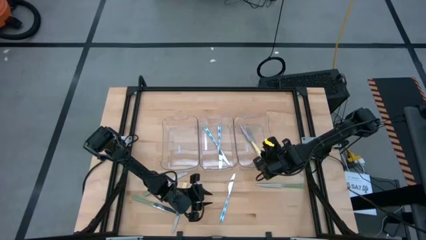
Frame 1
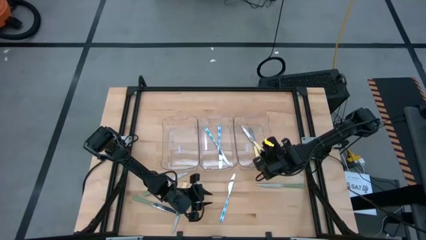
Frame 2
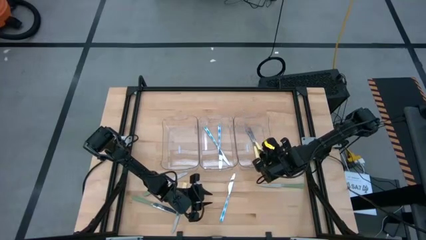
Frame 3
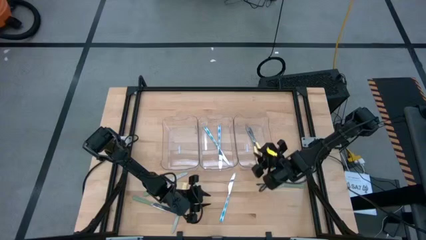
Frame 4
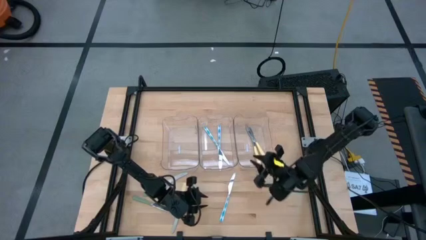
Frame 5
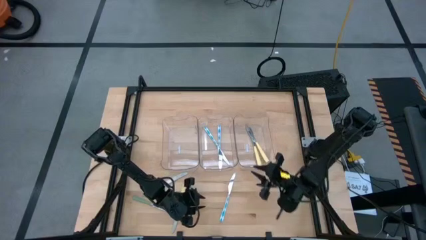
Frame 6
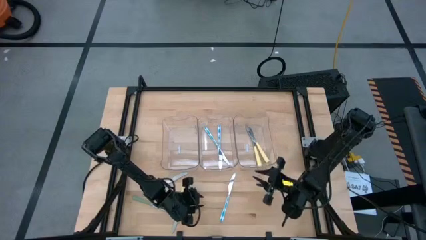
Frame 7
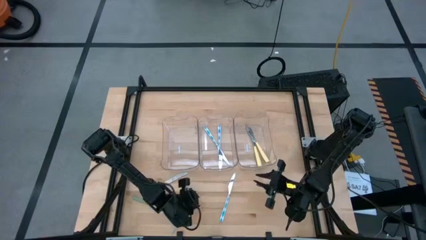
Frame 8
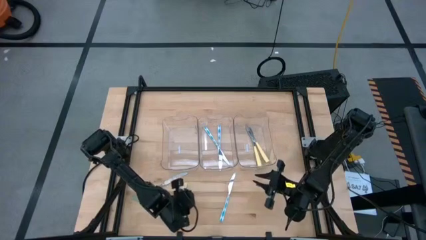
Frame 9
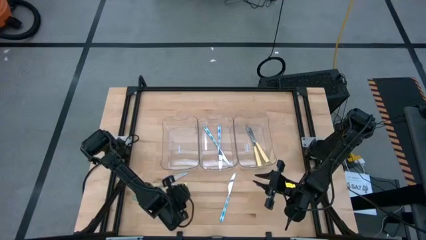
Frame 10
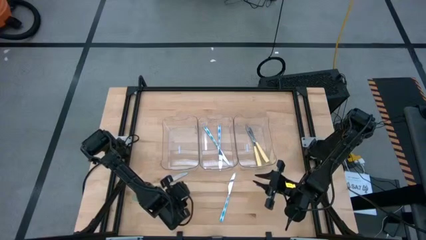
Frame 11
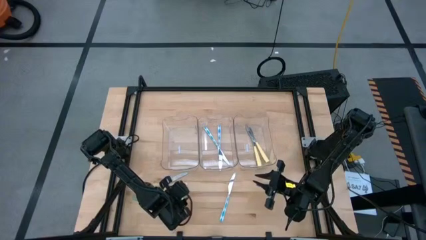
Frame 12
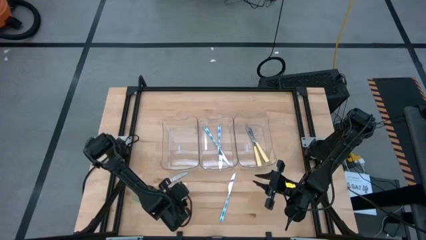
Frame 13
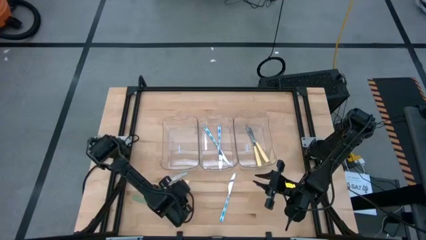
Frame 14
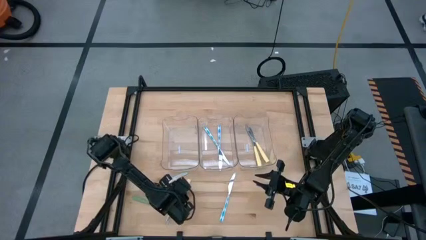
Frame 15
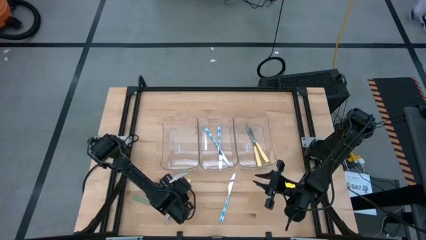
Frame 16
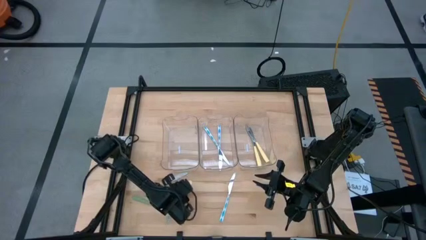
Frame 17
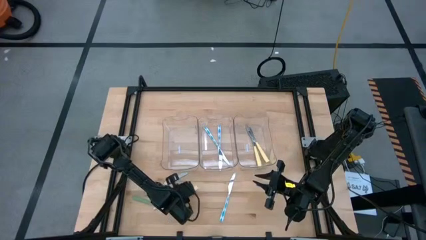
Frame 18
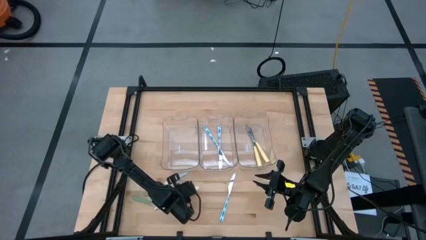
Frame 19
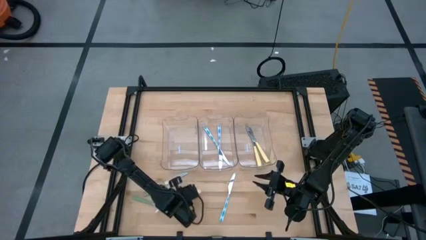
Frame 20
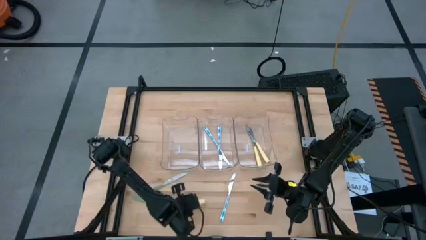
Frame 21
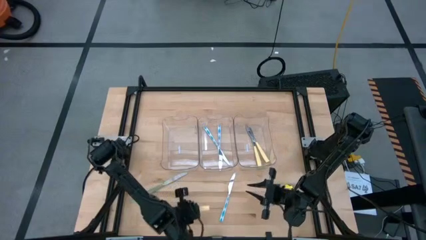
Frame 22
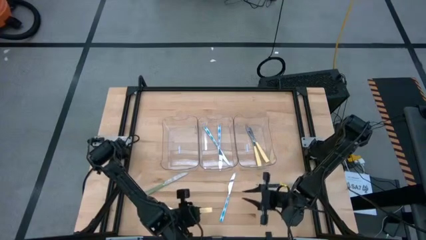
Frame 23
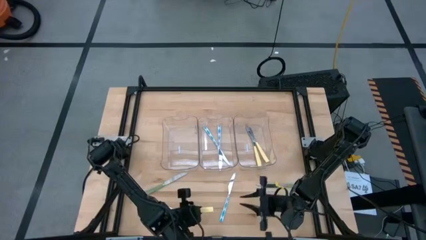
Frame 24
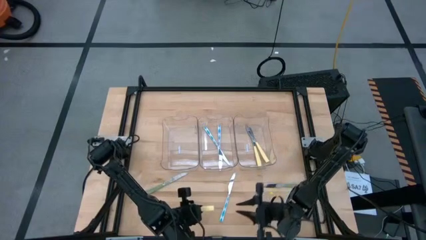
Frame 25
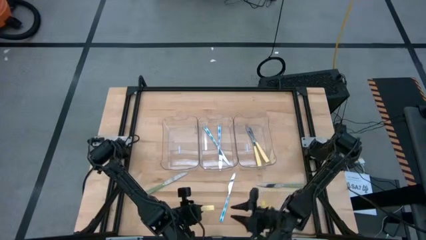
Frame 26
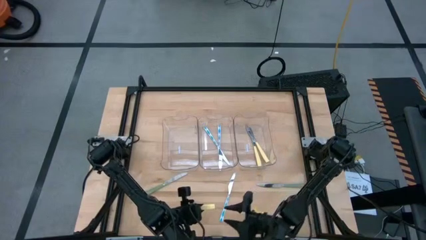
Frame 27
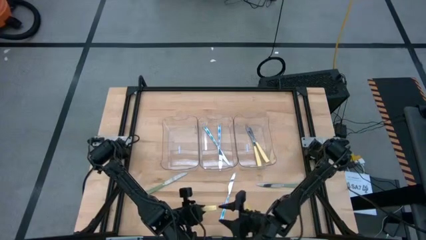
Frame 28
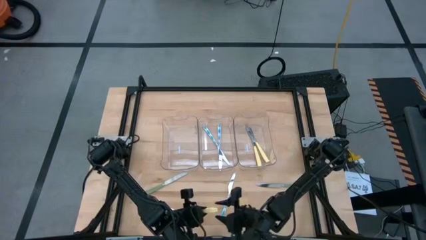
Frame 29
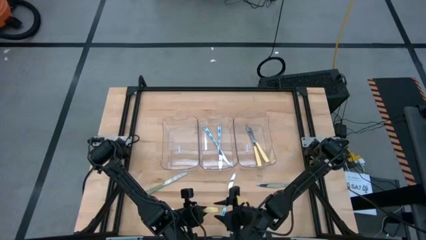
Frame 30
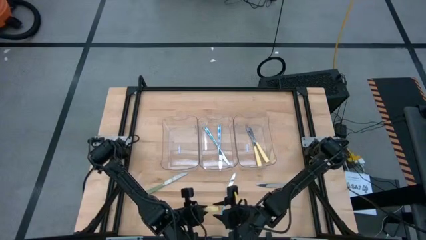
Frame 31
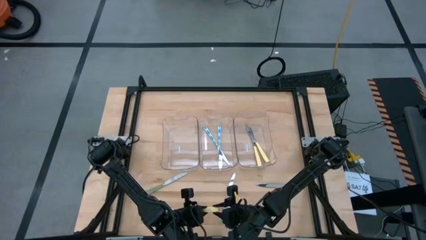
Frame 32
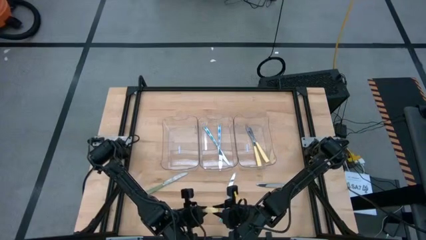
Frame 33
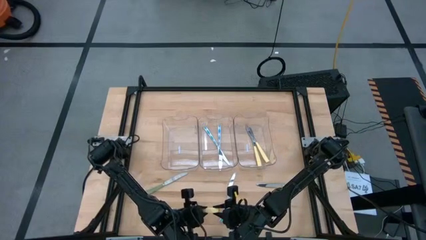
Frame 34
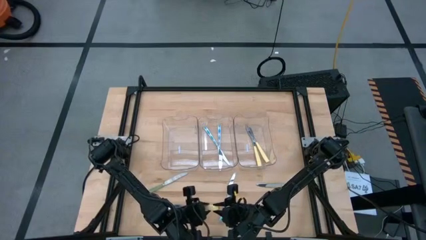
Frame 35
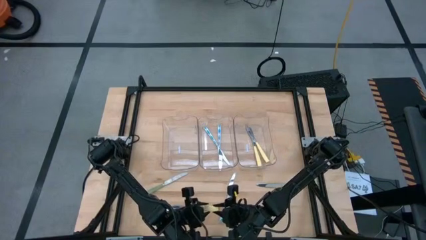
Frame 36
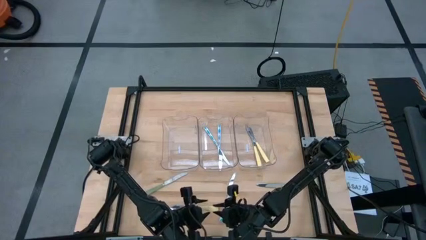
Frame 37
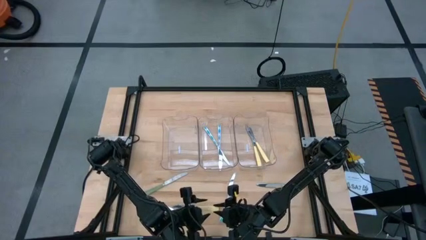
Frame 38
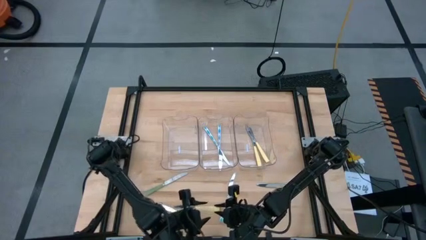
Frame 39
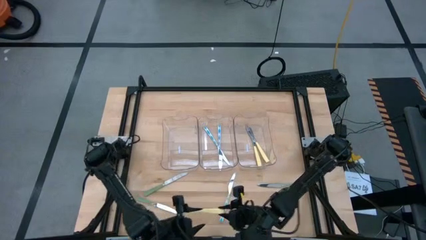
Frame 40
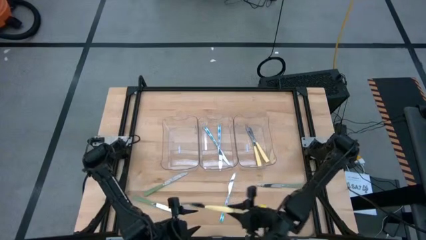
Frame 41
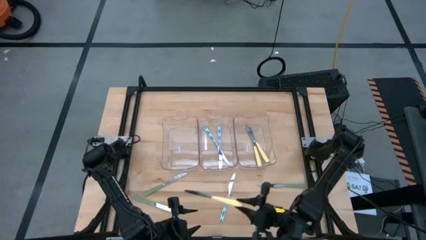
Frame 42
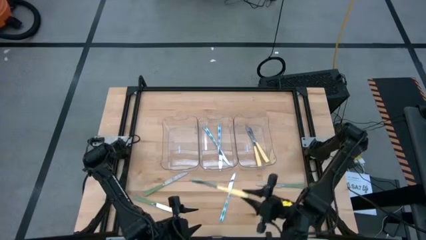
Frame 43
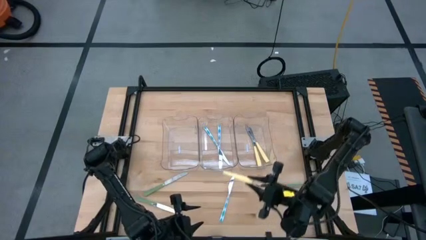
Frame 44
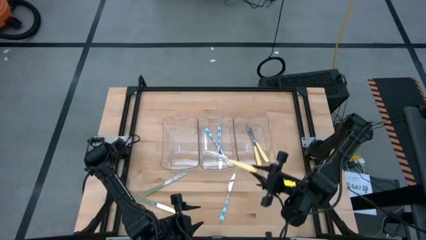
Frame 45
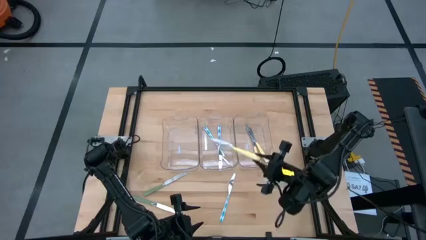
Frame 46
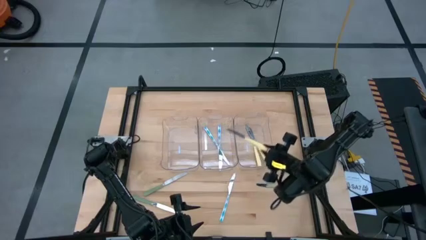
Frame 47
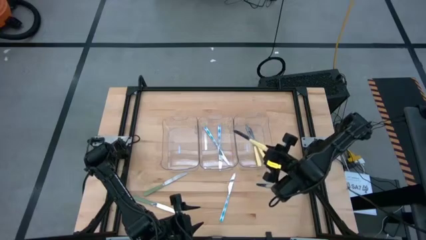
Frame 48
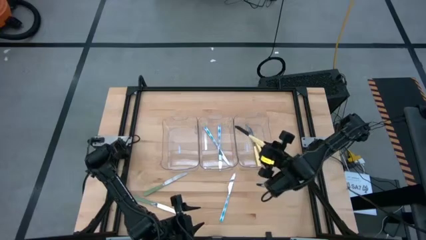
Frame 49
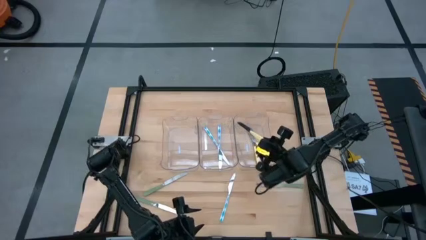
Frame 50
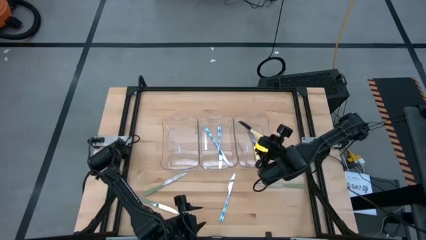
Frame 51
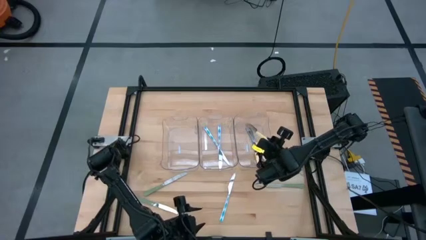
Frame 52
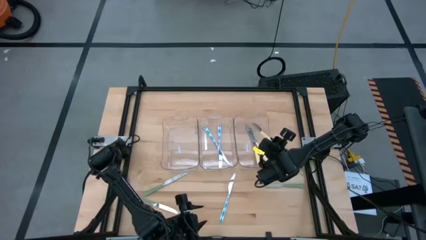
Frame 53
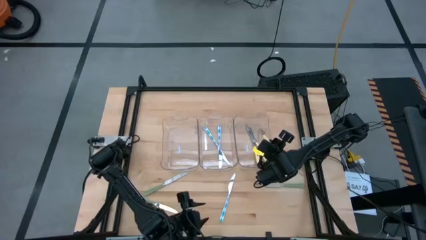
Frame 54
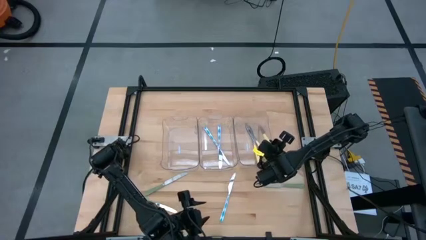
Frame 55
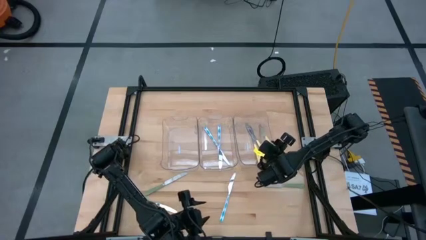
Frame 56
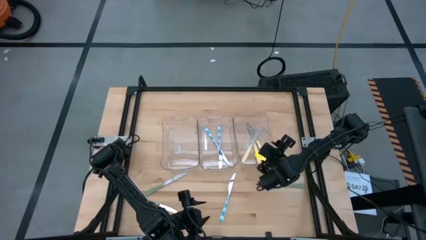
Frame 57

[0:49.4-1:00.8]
Task: Sort silverware by color (type)
Put the yellow knife into the right transparent bin

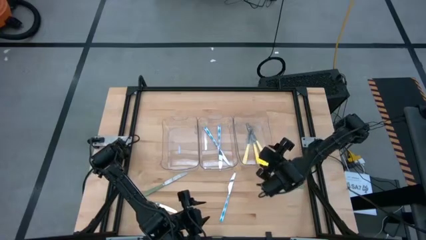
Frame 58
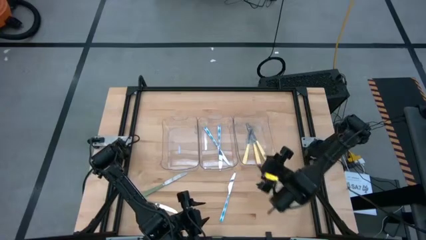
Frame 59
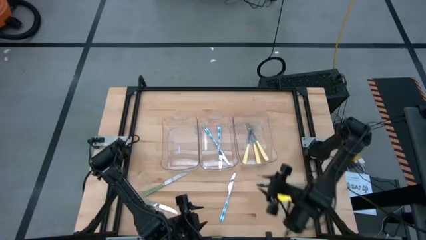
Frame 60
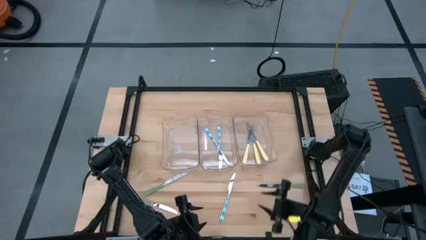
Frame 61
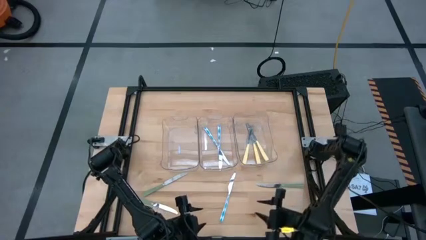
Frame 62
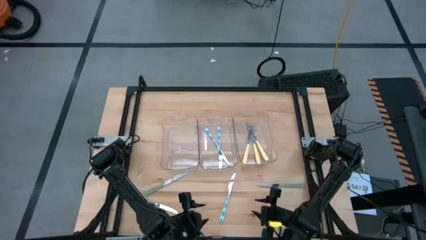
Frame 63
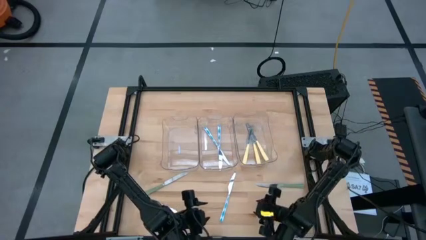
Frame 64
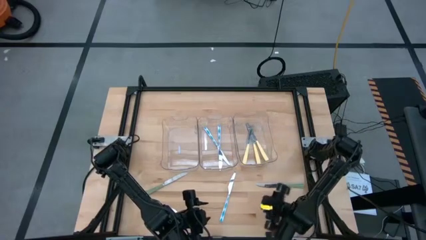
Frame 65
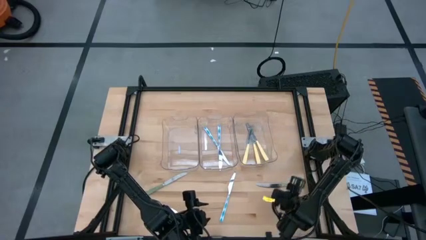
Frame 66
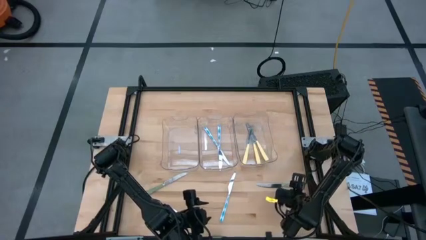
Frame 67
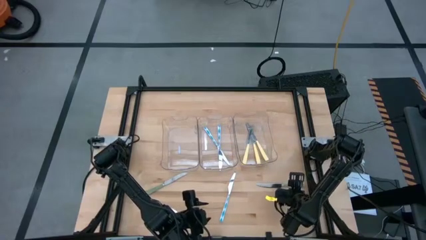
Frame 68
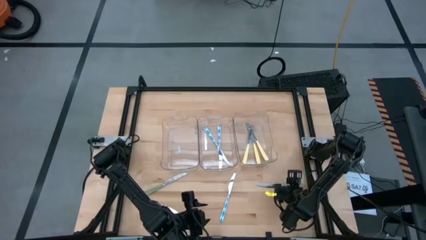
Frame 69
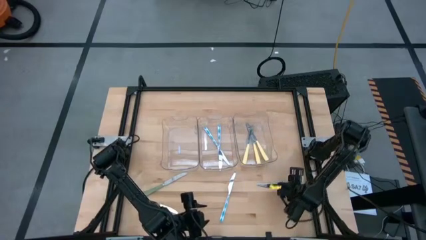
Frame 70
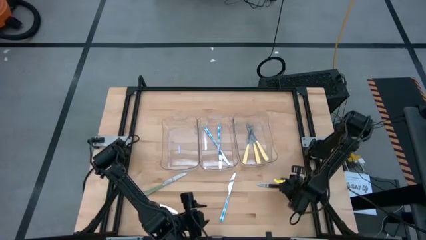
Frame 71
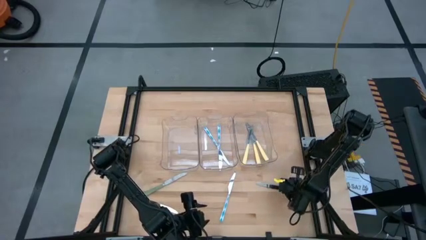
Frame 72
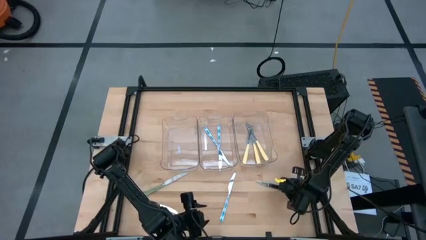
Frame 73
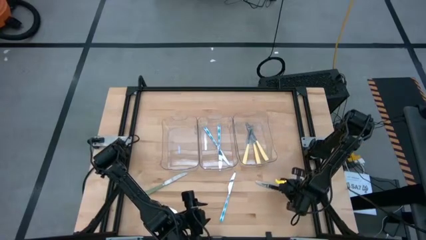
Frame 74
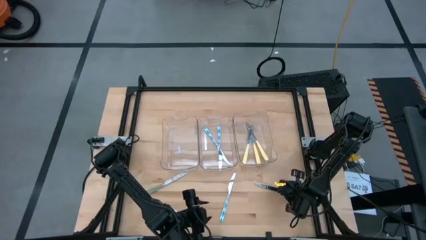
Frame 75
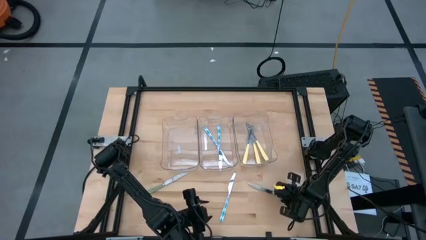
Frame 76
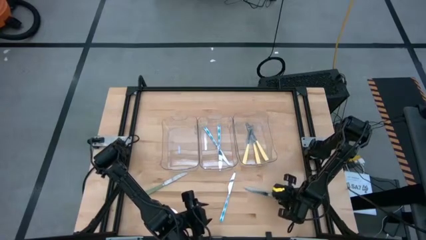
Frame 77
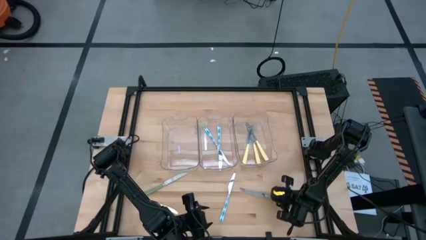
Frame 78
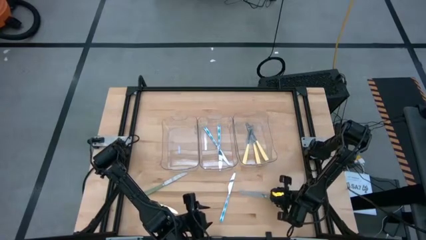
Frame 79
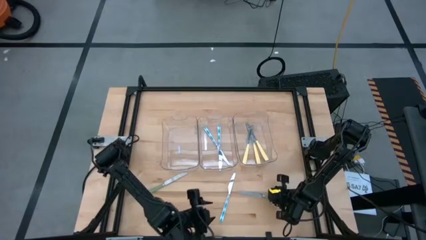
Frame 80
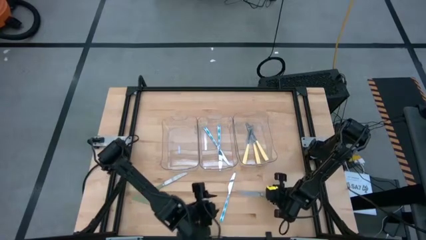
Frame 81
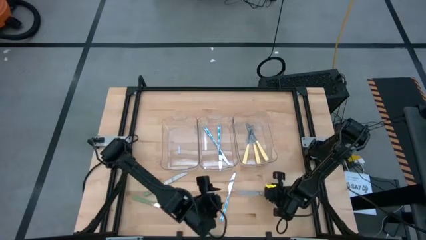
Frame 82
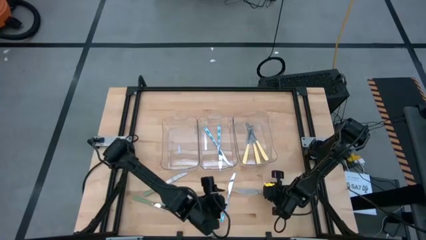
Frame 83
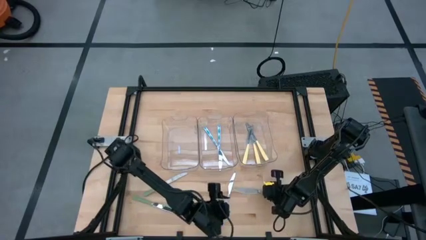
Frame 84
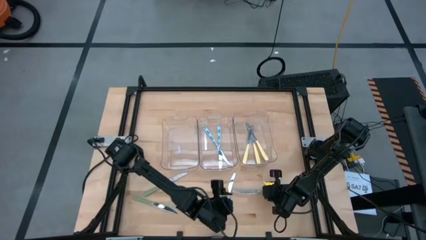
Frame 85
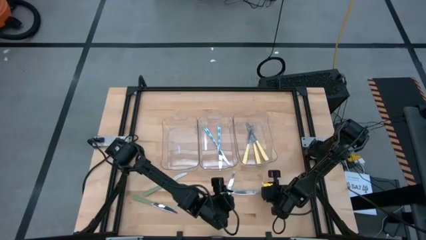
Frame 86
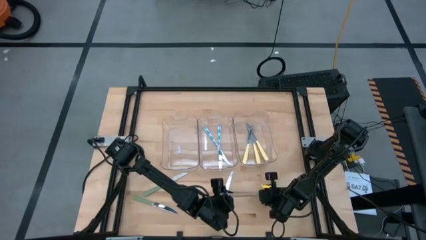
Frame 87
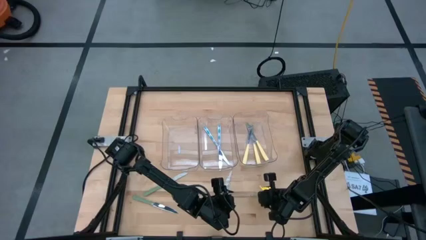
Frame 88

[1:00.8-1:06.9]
Put the middle right green knife into the left transparent bin
